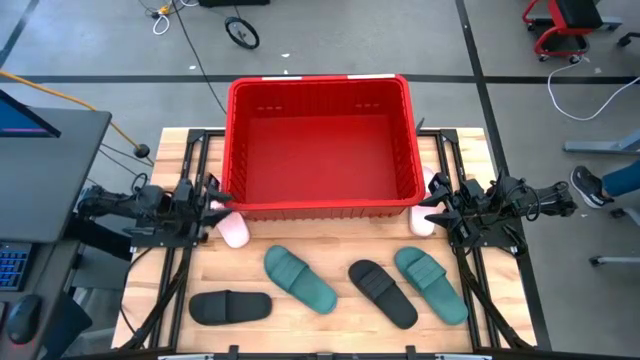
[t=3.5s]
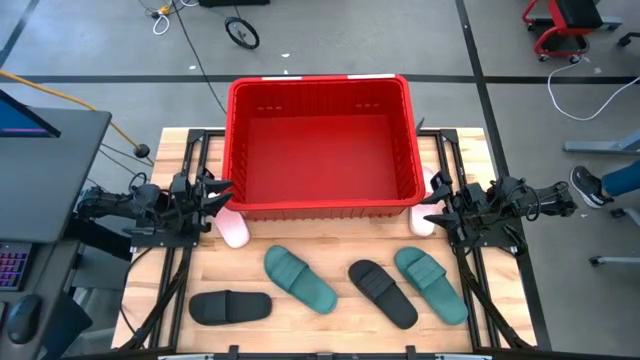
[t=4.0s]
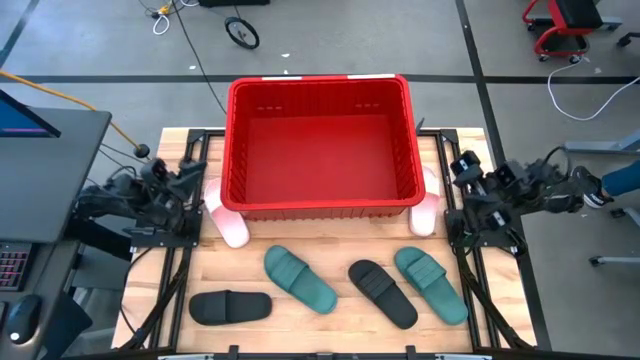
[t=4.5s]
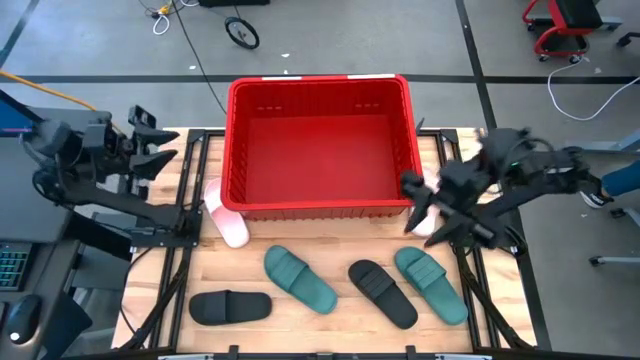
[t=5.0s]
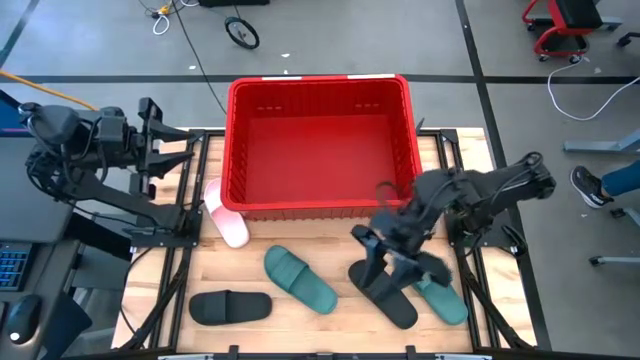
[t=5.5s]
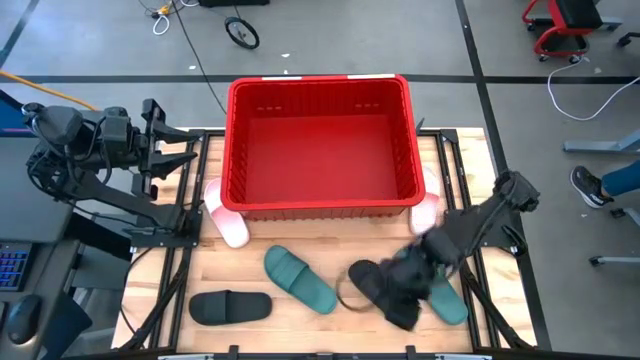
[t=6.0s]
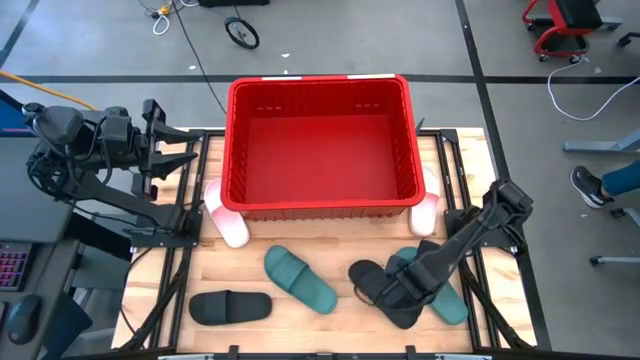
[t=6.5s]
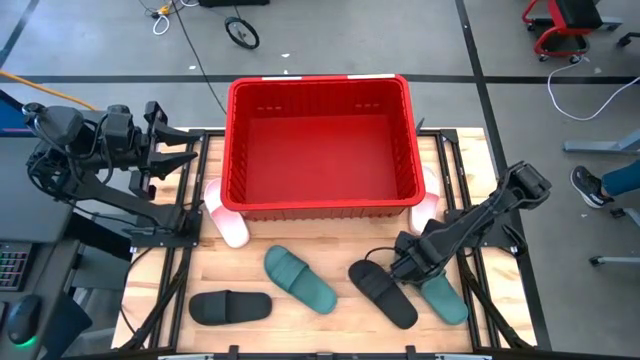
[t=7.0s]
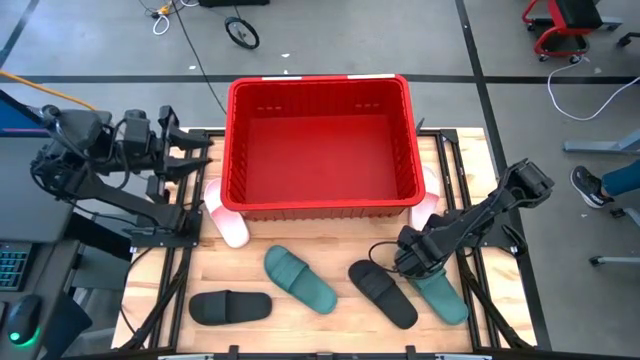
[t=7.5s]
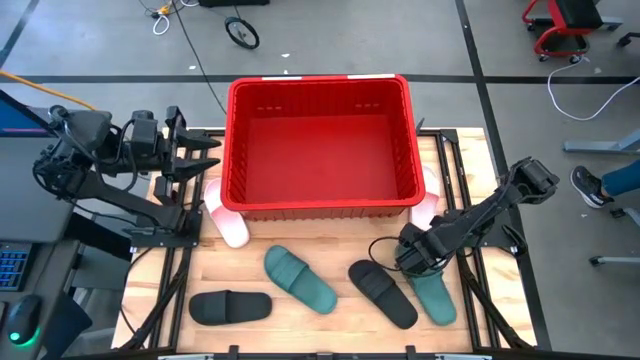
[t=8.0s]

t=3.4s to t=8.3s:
Task: Pick and place slides into bin
Put the right green slipper into the red bin

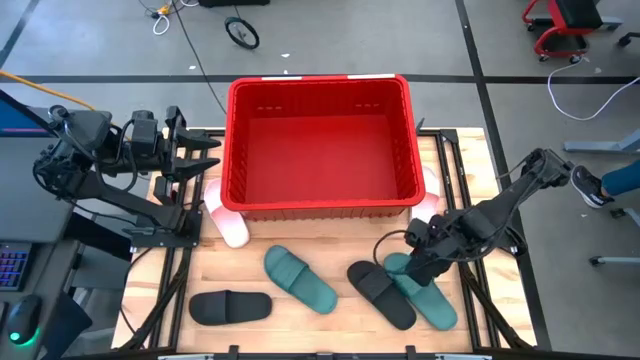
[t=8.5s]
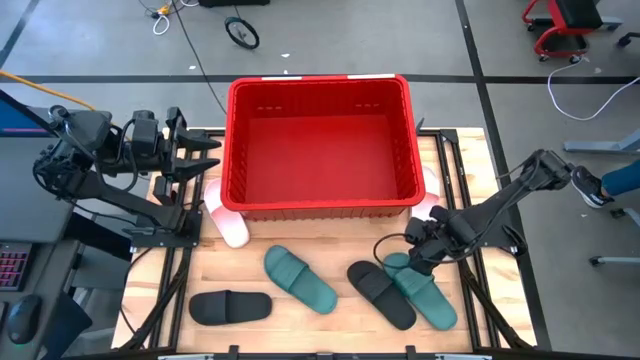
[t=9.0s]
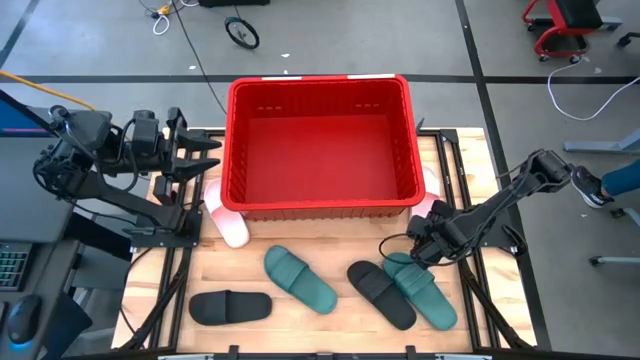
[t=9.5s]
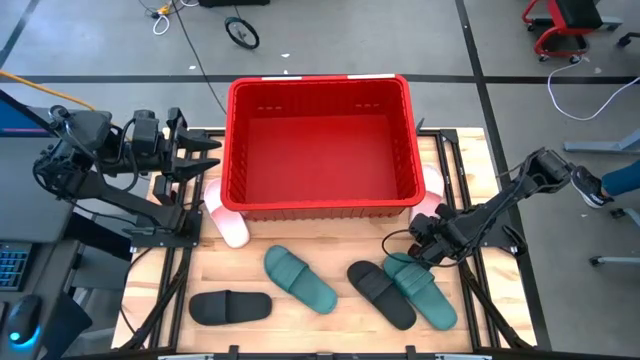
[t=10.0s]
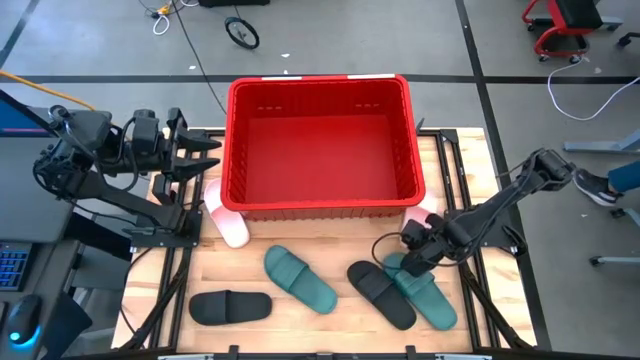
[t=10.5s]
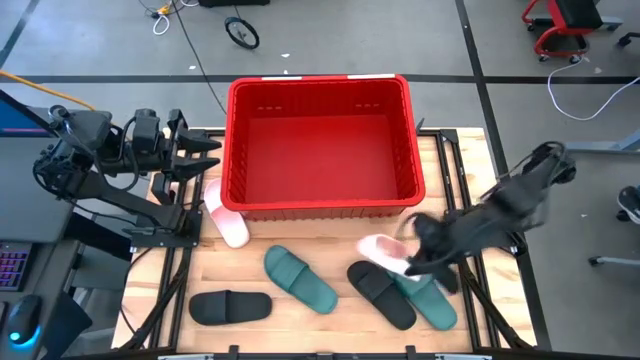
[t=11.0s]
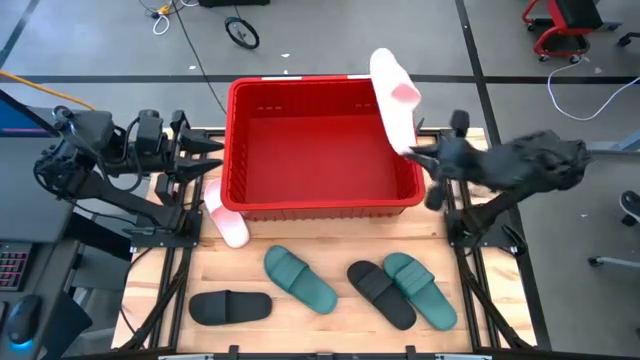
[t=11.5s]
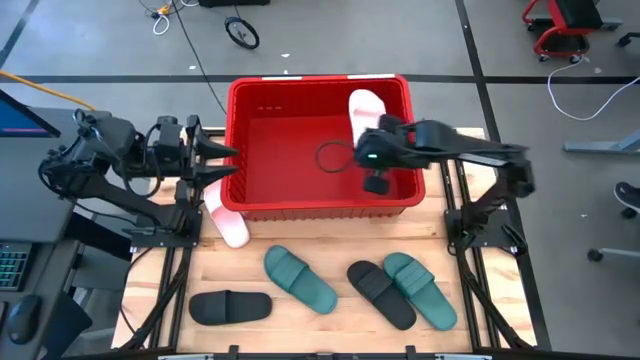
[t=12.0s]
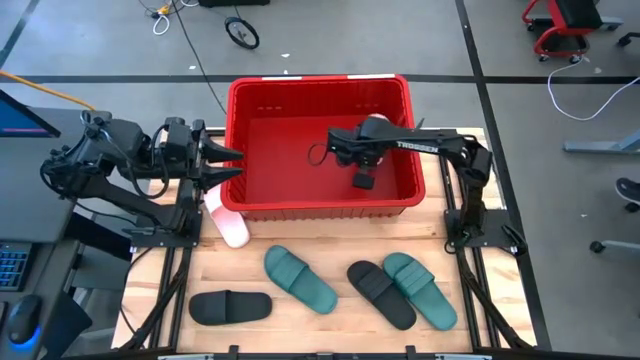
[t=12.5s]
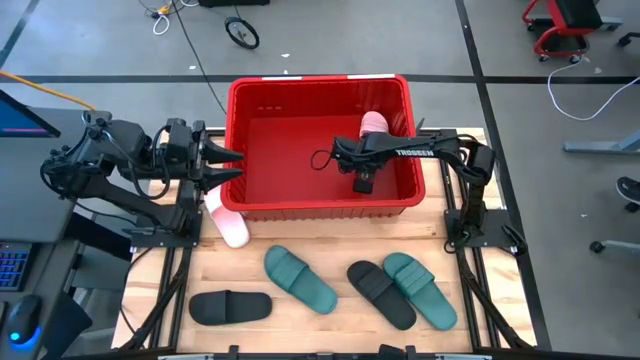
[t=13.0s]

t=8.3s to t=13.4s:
Put the right pink slipper into the red bin

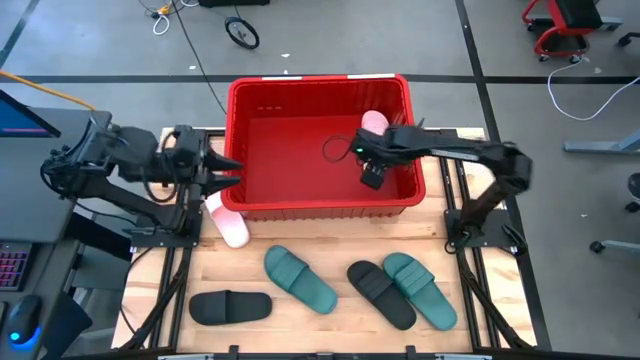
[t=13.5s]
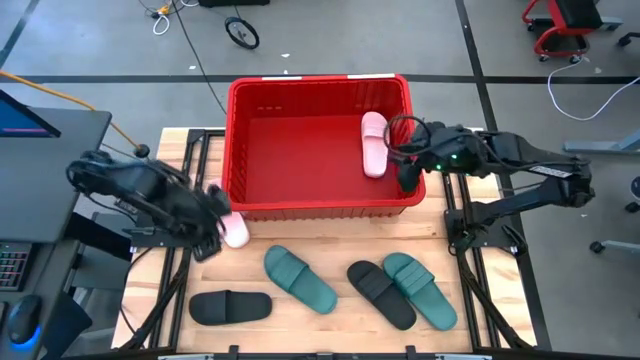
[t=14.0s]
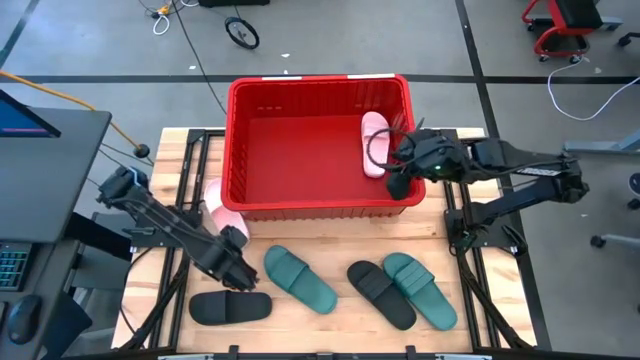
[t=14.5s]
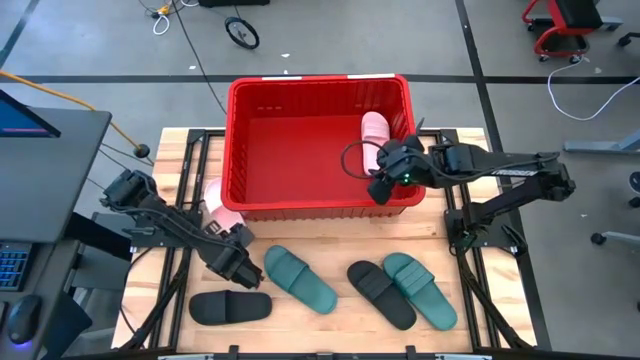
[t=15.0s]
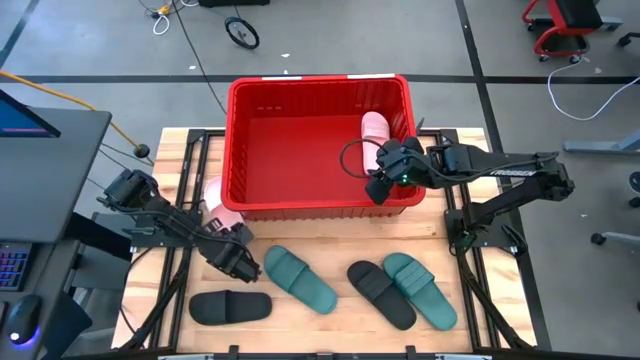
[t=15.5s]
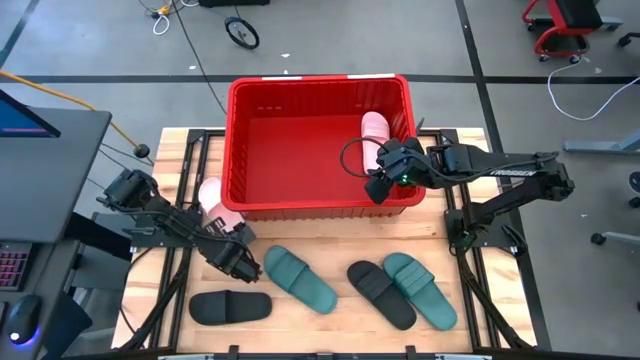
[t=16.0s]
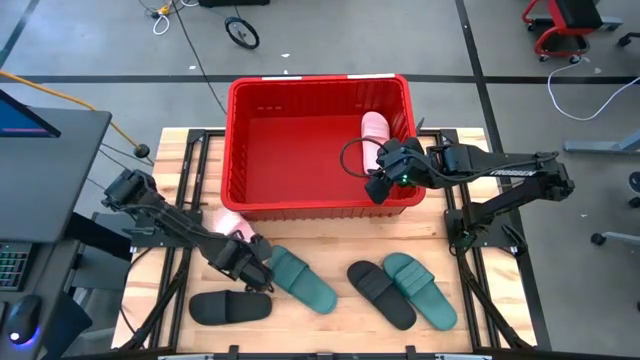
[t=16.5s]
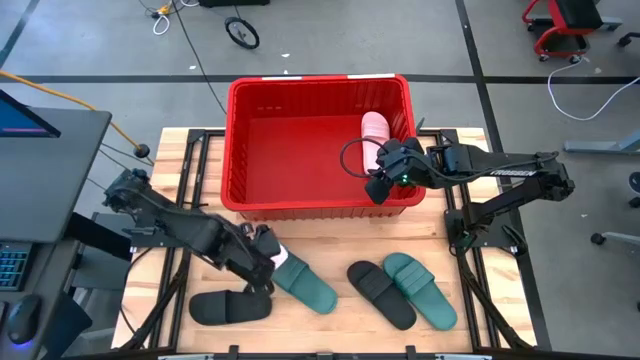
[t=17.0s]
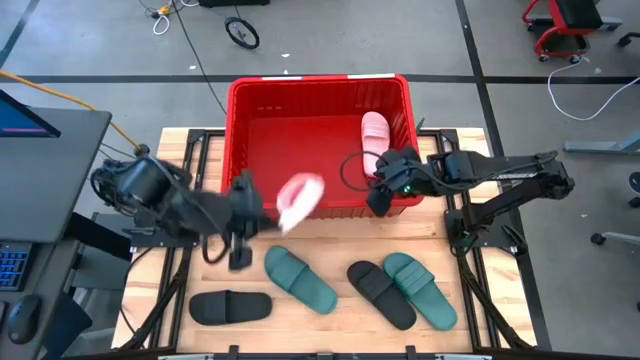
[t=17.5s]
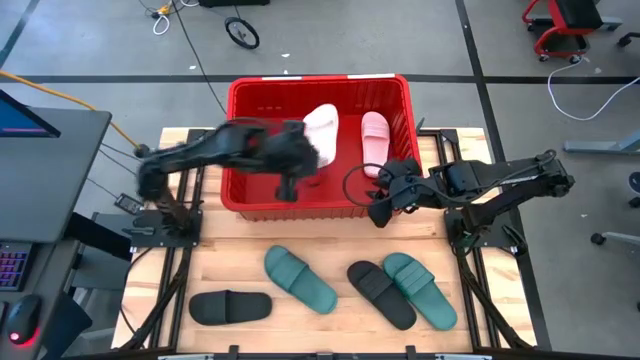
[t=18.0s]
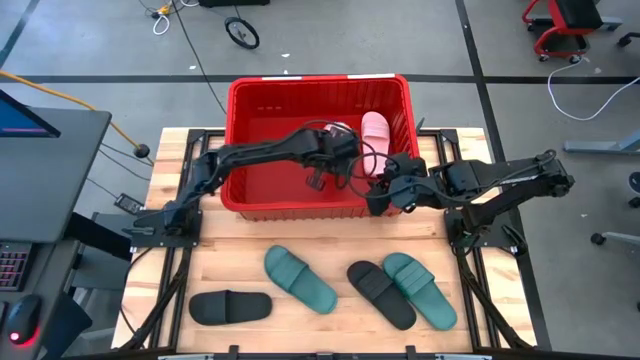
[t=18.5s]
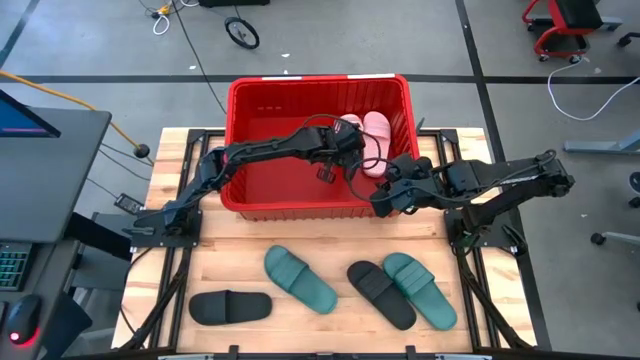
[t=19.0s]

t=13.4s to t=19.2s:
Put the pink slipper into the red bin

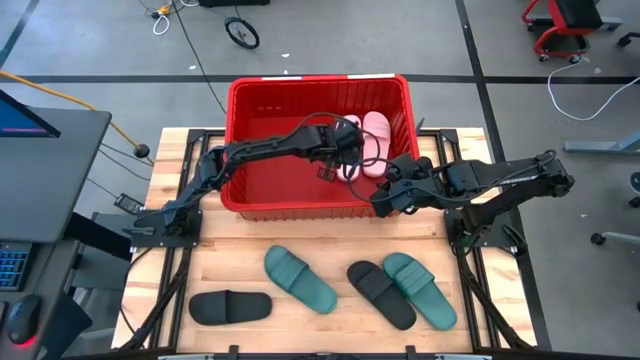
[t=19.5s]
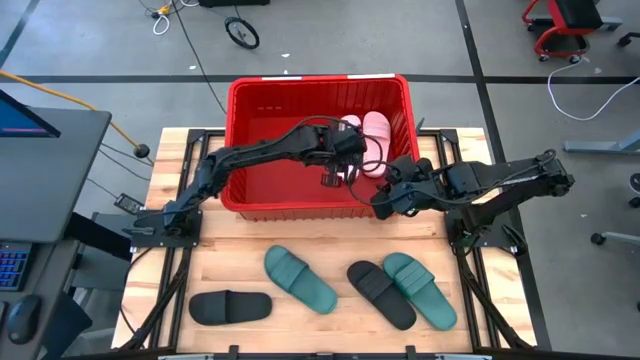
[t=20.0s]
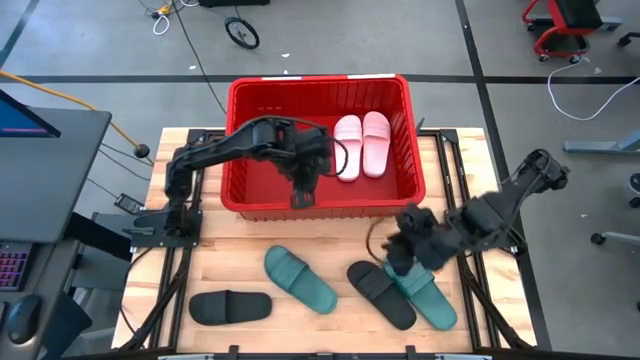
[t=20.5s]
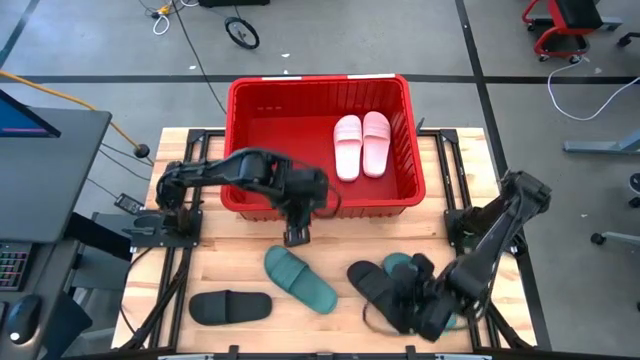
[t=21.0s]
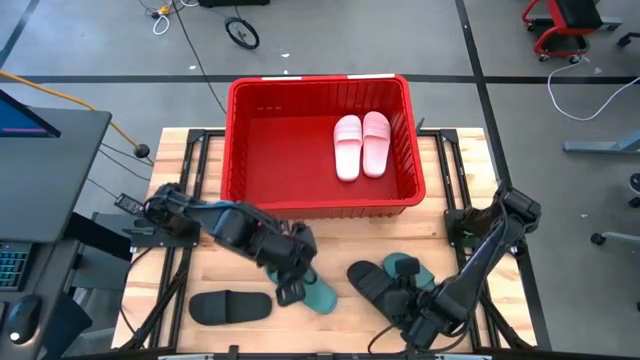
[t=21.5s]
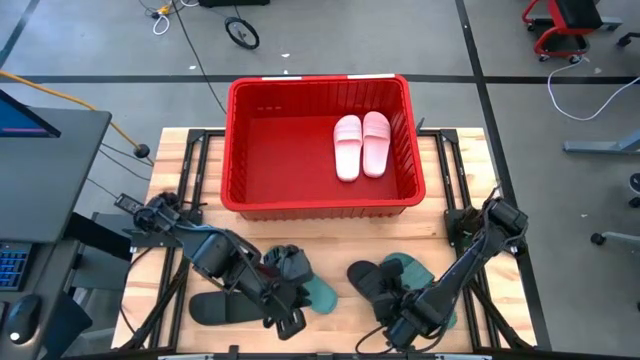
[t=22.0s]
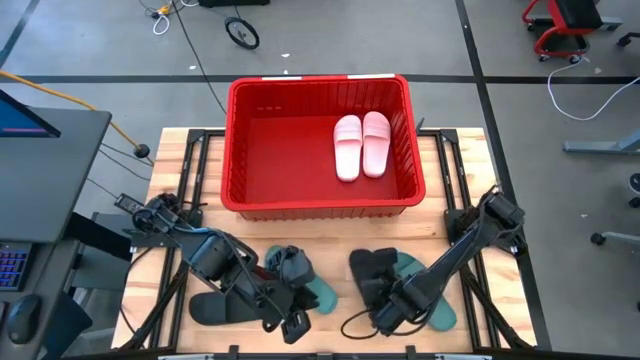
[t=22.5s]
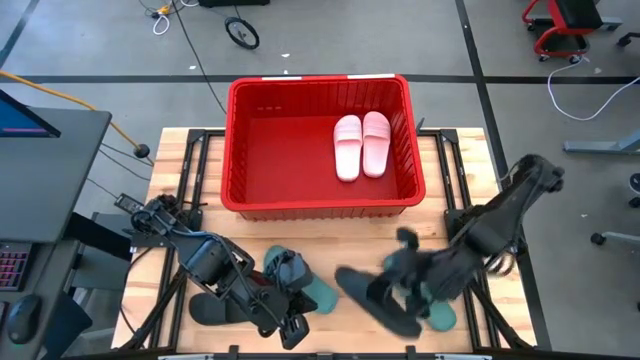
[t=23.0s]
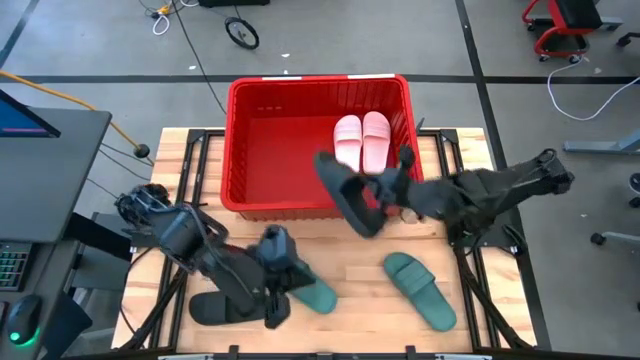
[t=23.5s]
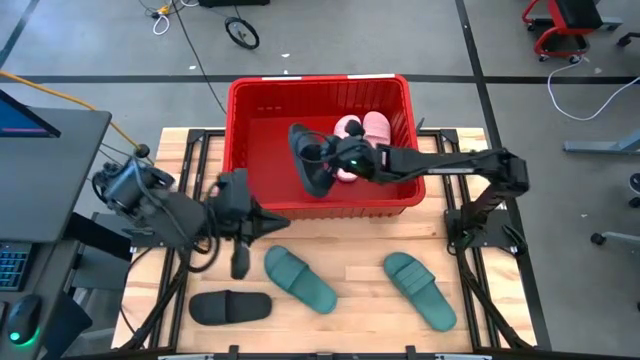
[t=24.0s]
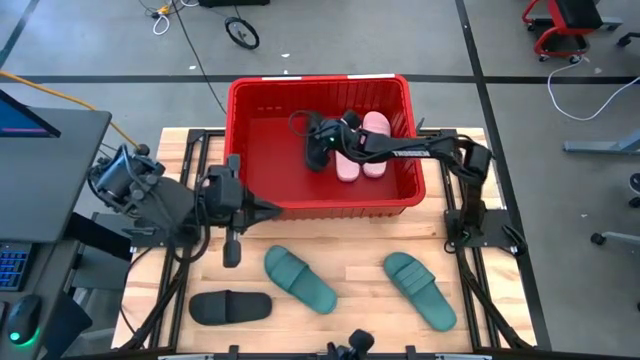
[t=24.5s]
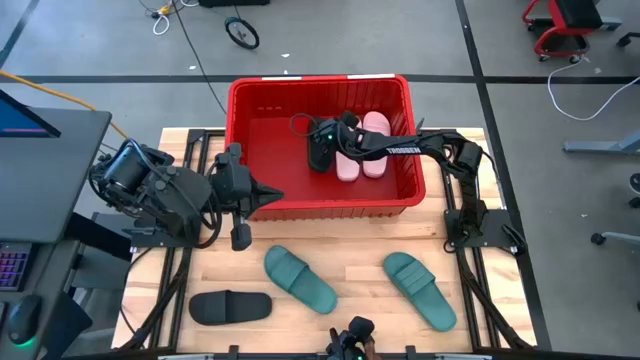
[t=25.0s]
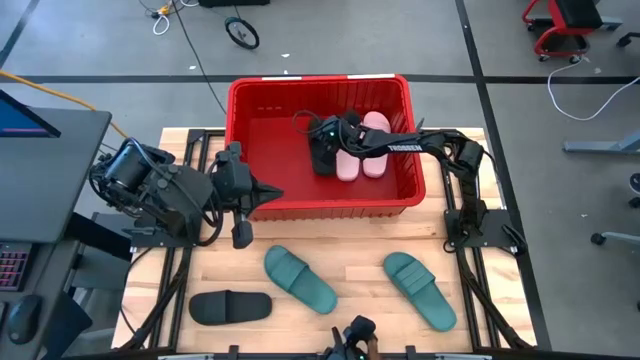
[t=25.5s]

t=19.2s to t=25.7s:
Put the right black slipper into the red bin
